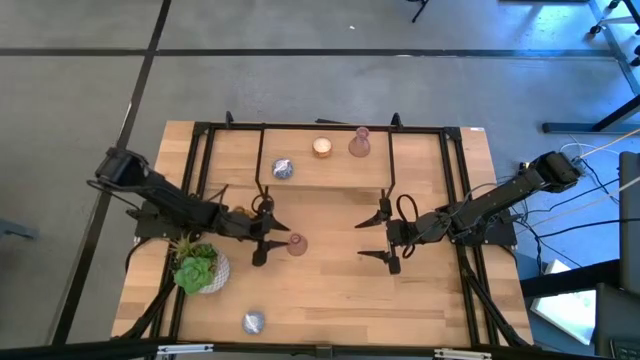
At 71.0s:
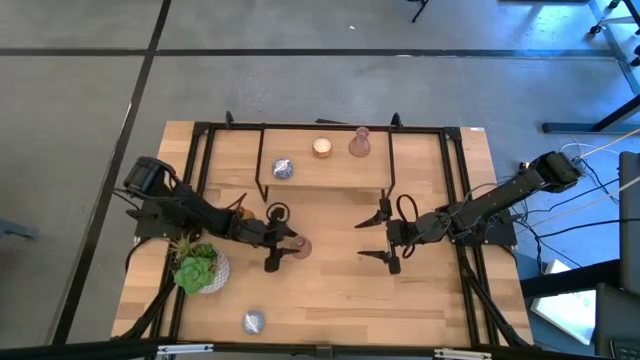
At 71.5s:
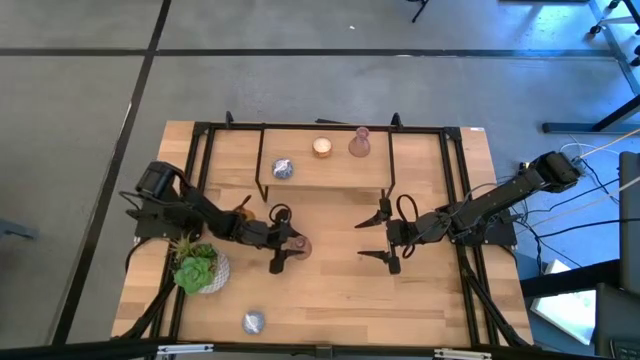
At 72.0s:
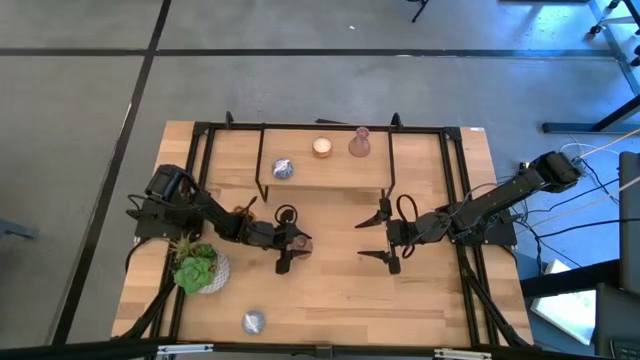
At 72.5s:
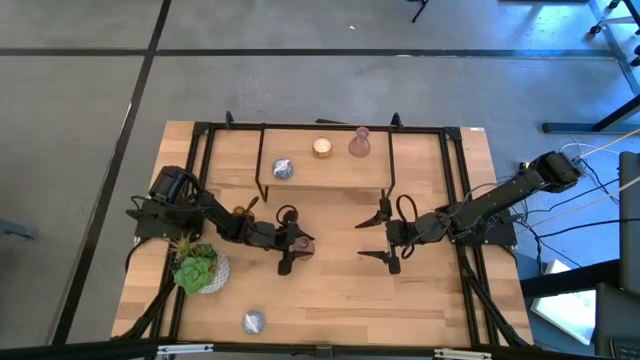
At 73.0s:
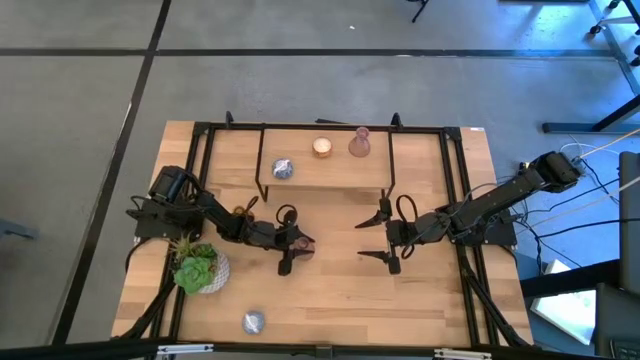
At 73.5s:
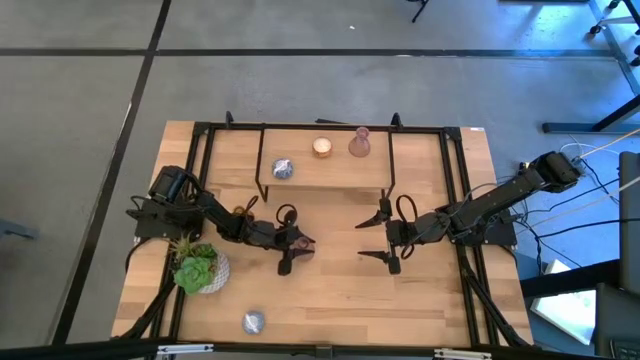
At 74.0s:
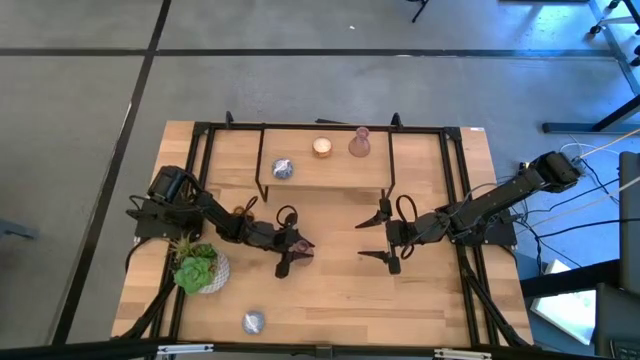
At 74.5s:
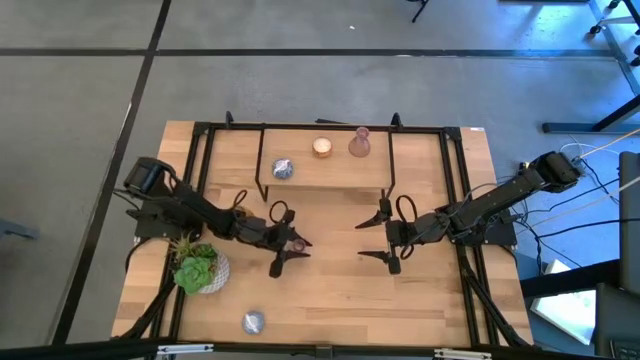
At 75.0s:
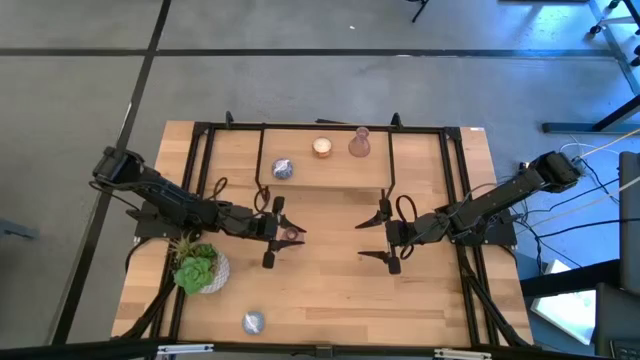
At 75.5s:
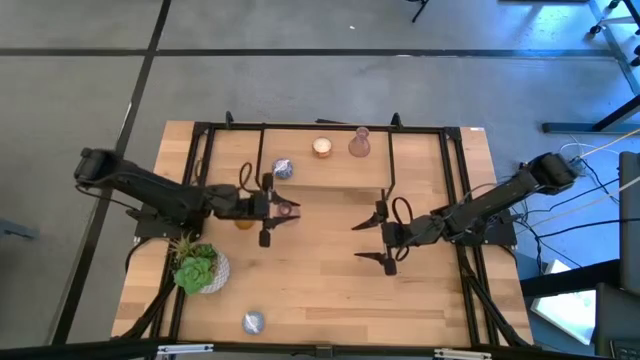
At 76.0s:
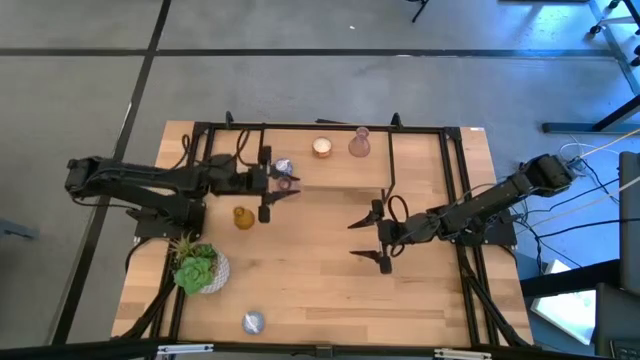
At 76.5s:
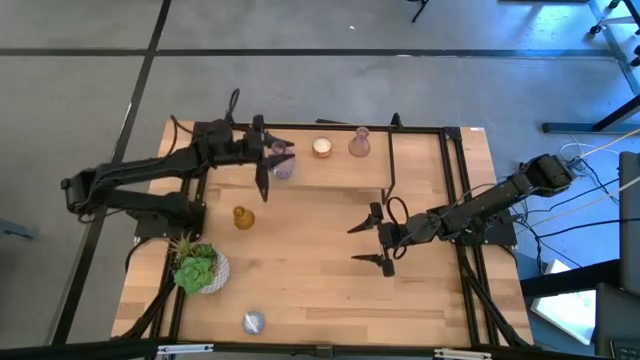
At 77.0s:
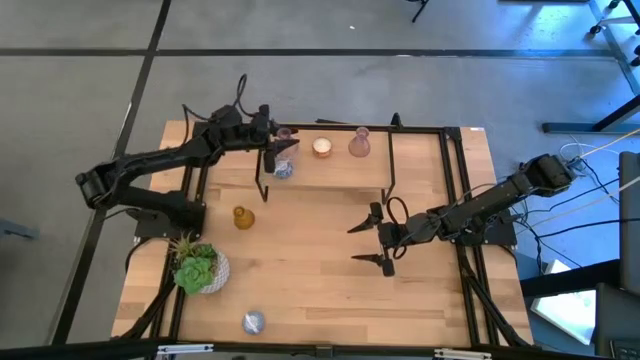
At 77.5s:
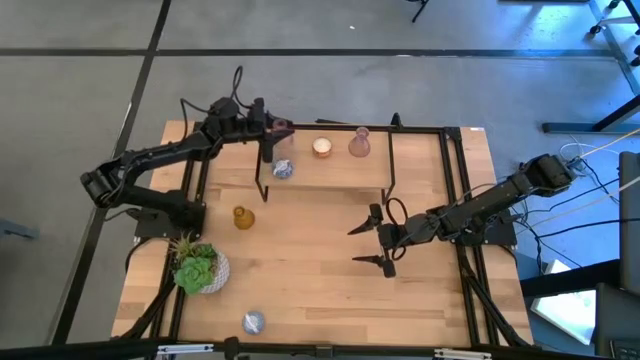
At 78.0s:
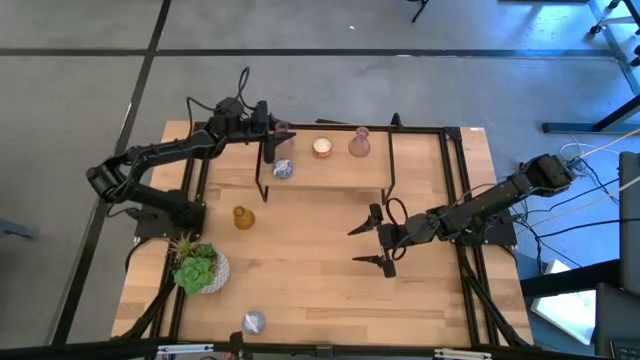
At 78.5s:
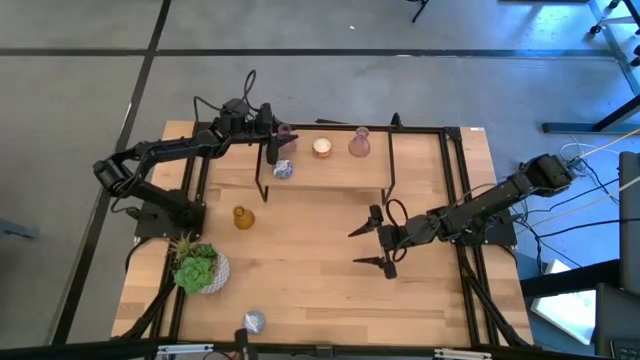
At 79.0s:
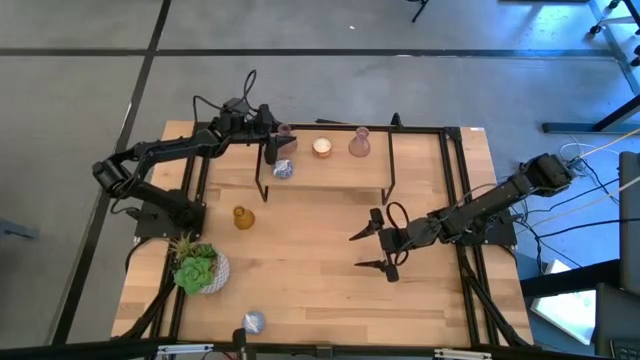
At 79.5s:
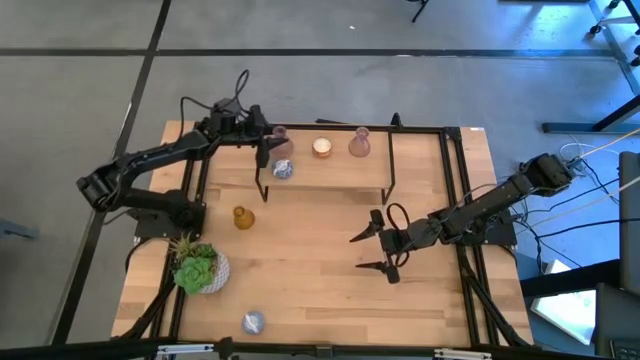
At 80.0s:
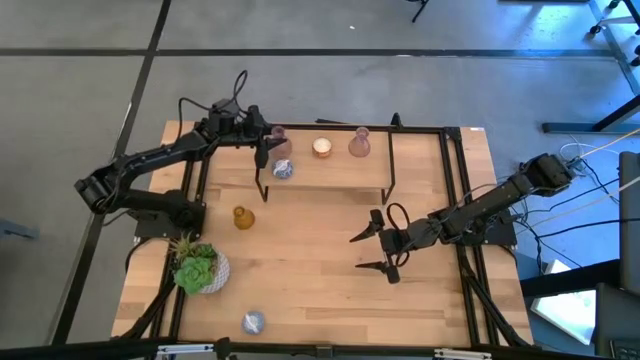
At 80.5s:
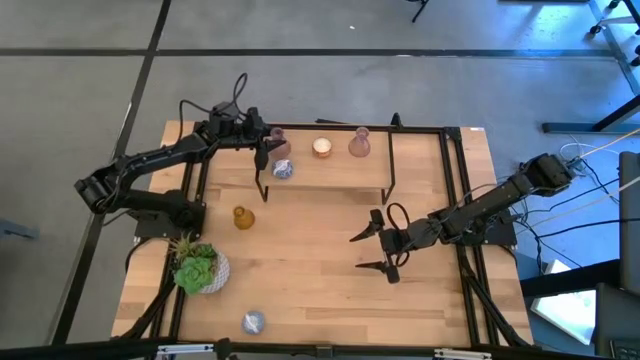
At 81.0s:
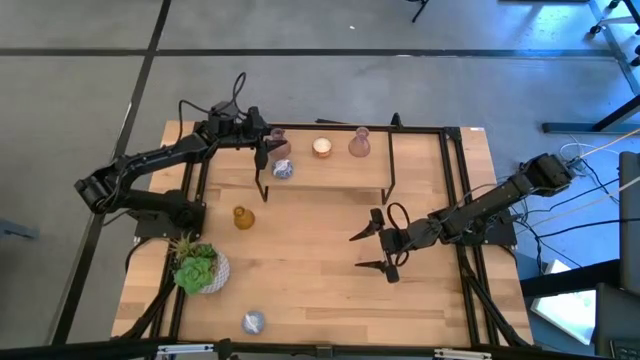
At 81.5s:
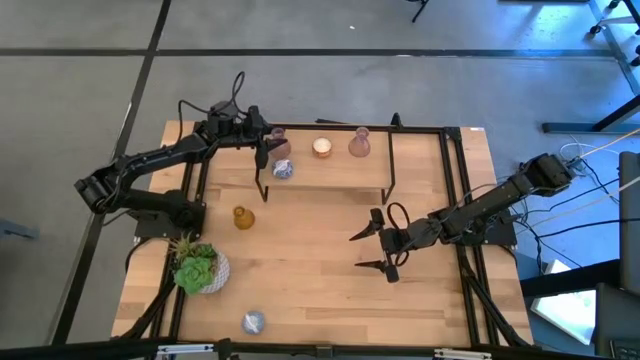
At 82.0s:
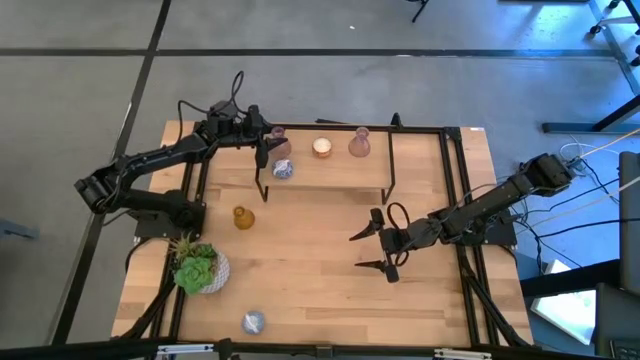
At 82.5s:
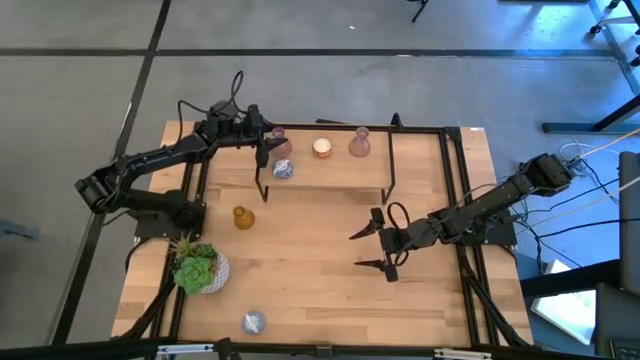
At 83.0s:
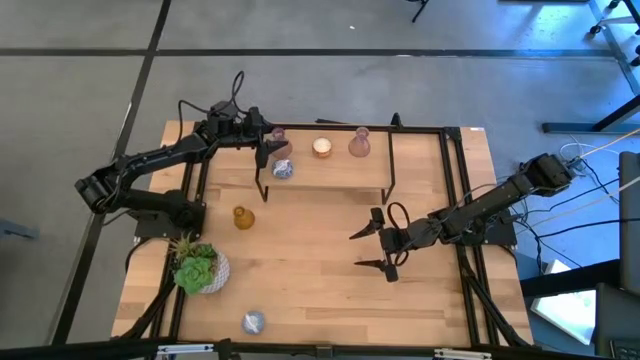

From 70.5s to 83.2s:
Task: Pick & Place candle stick holders
Put the pink glass candle holder on the shelf

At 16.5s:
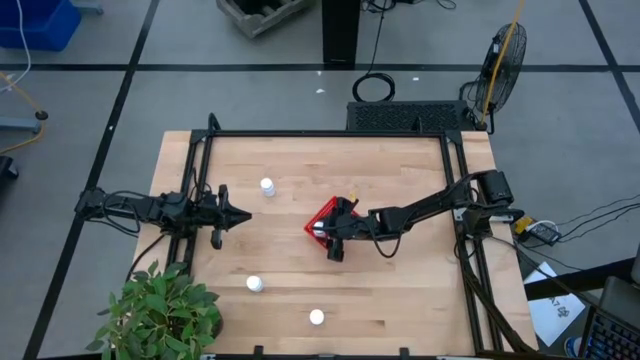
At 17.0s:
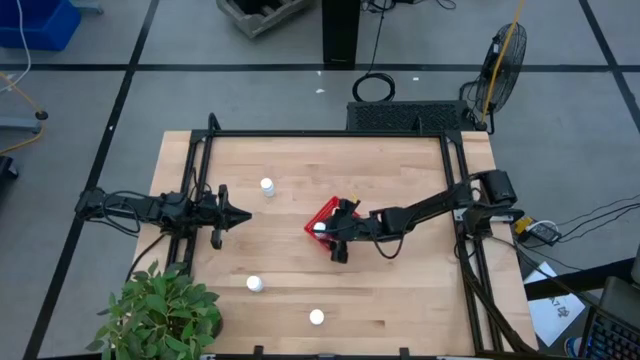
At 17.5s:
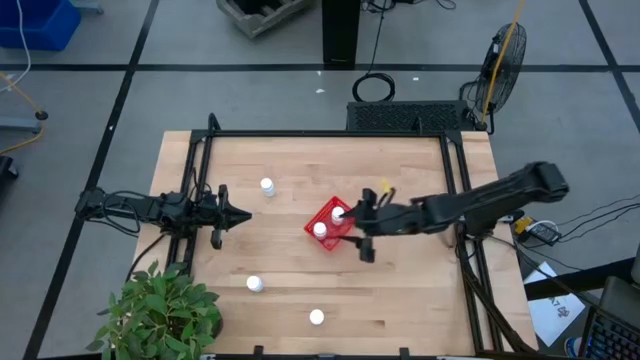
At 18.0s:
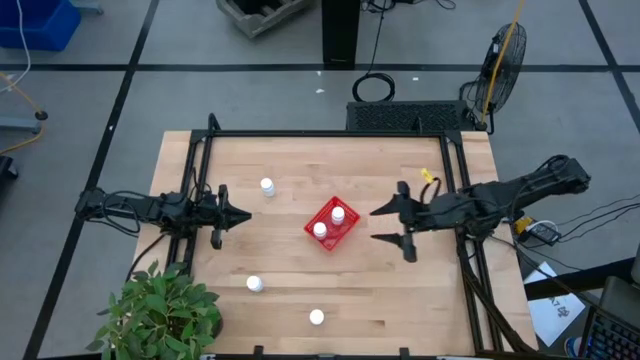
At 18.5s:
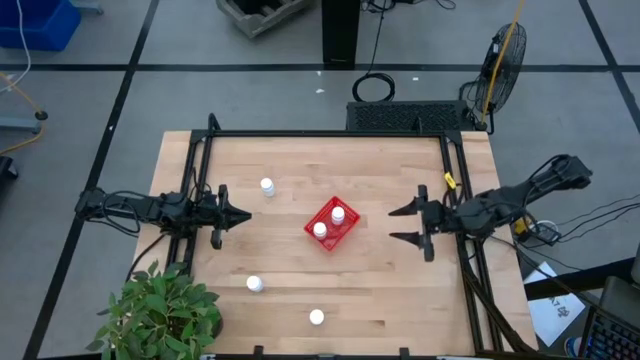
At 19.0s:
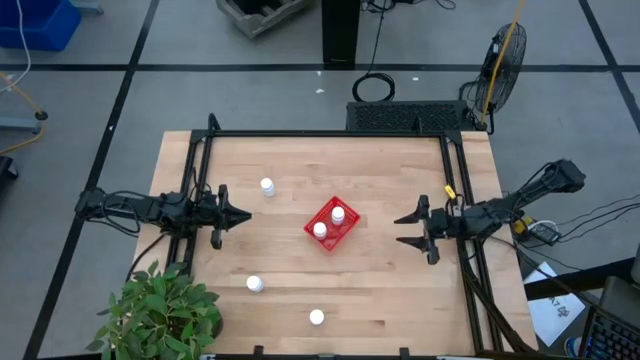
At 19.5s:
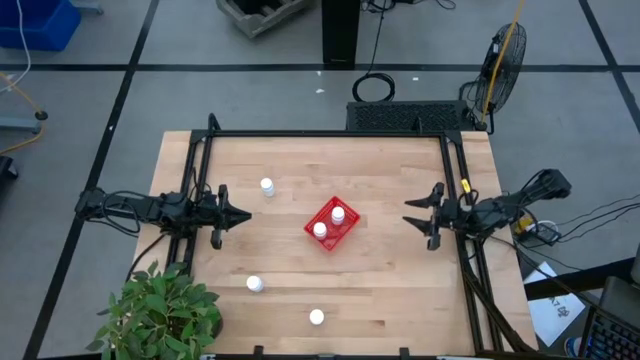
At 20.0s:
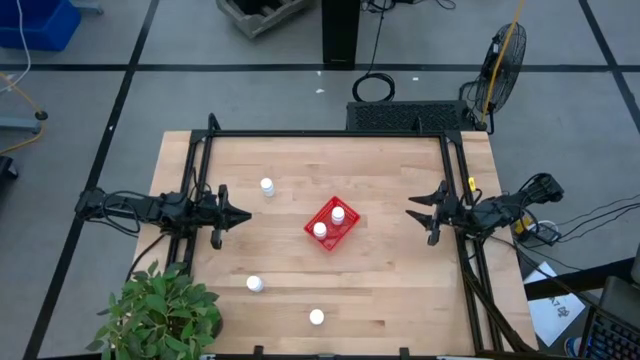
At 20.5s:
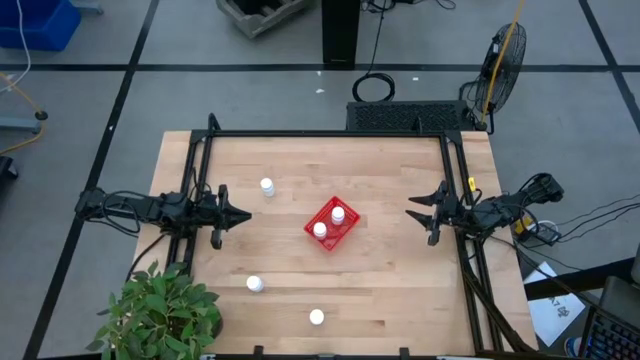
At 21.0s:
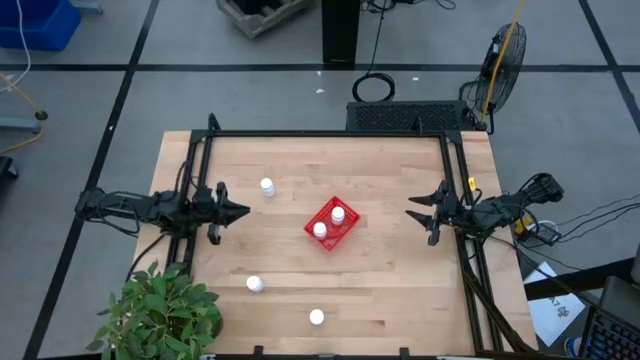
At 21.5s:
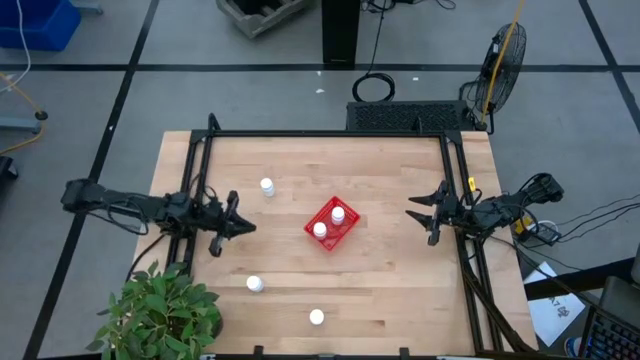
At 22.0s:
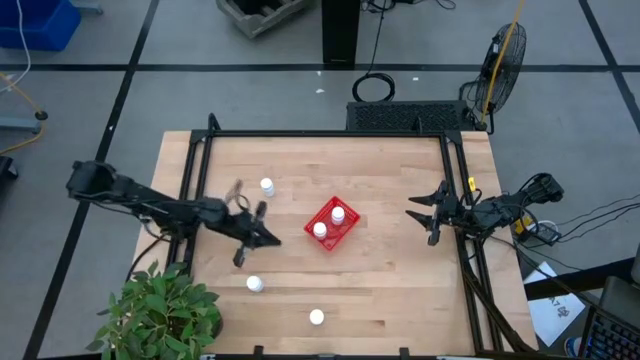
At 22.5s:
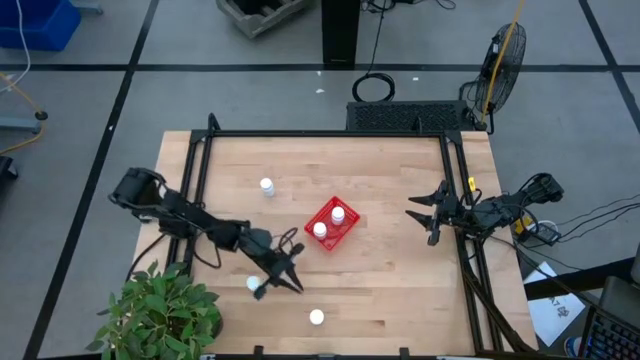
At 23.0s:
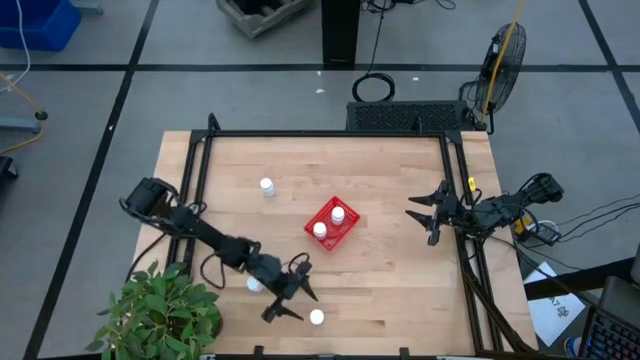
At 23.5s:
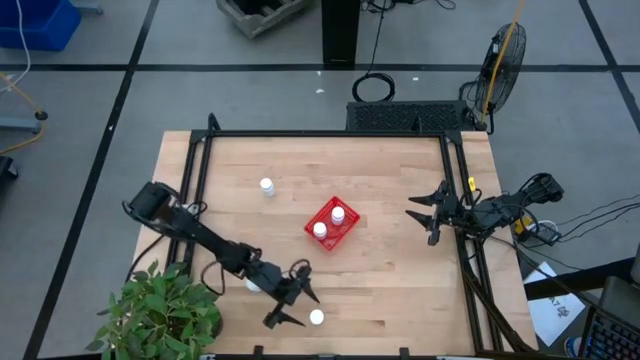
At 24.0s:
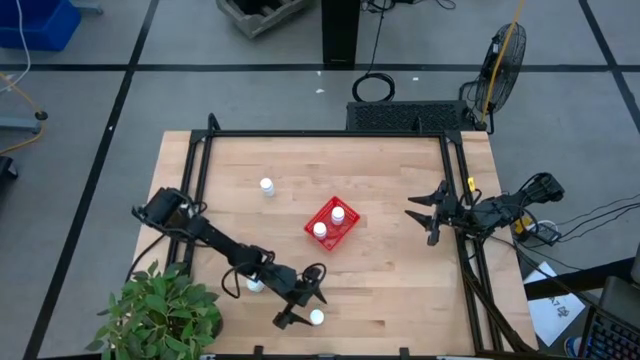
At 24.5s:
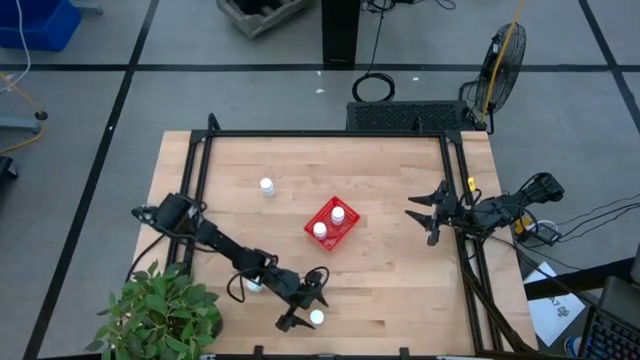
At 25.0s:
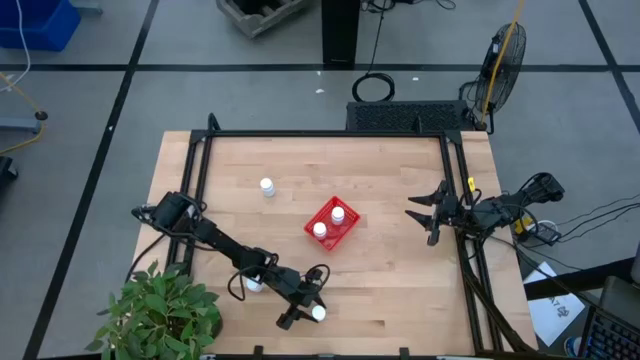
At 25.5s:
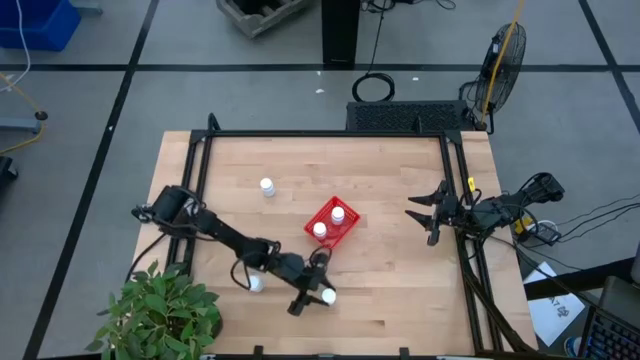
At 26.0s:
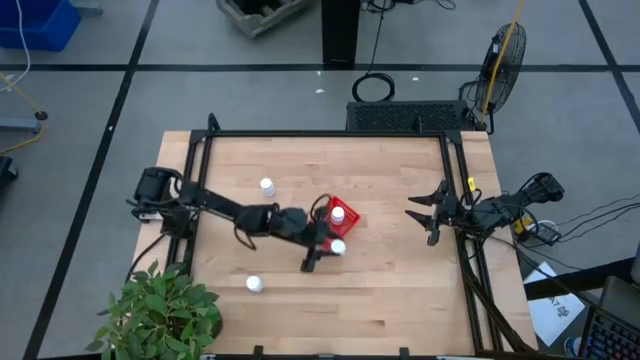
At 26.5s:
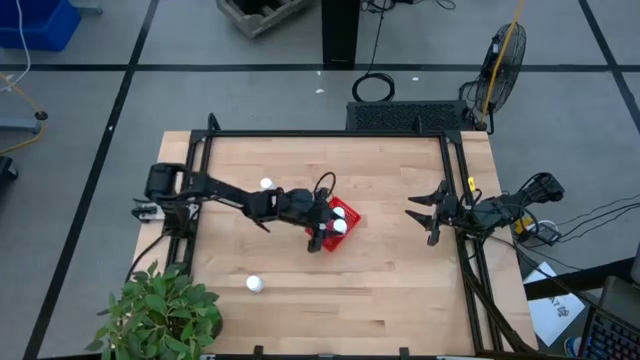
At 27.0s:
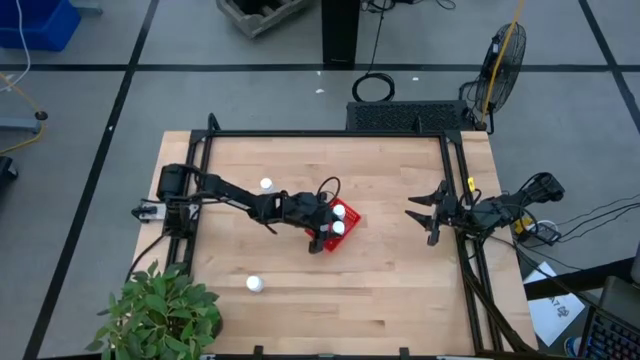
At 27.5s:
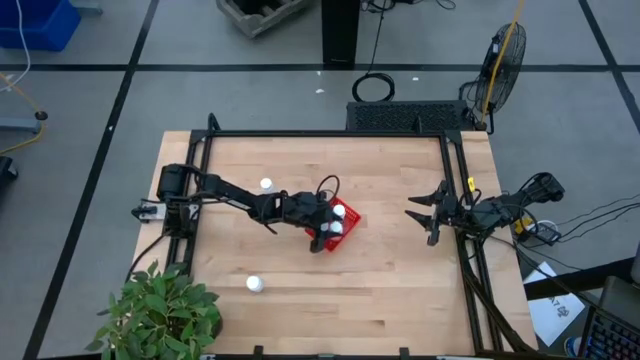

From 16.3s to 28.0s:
Task: Pick and place pill bottles into a basket
Put the white medicine bottle into the red bin
